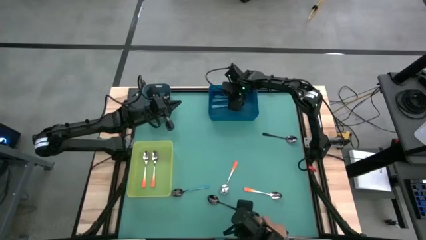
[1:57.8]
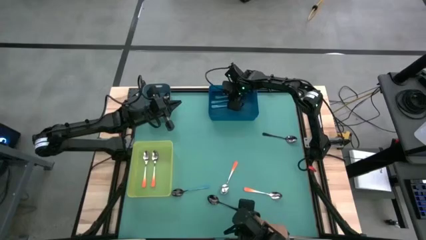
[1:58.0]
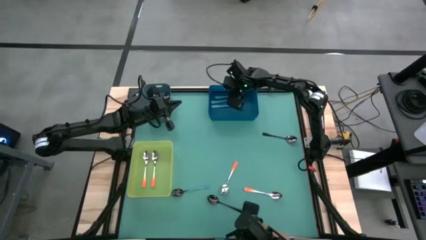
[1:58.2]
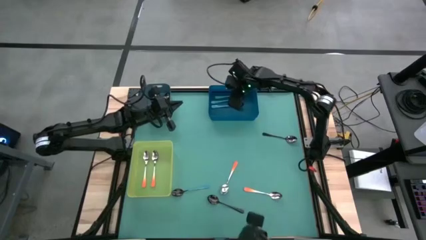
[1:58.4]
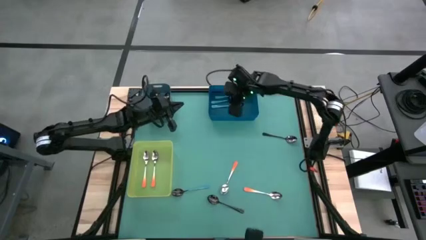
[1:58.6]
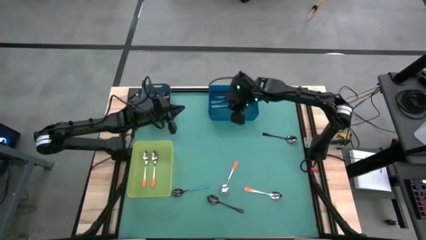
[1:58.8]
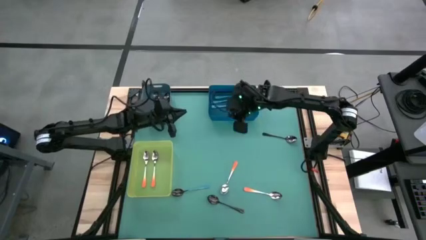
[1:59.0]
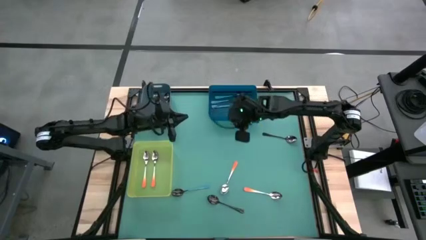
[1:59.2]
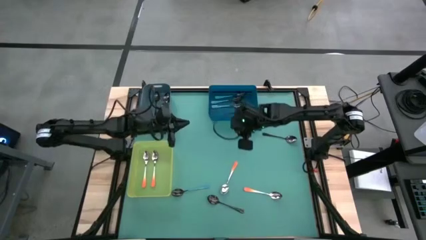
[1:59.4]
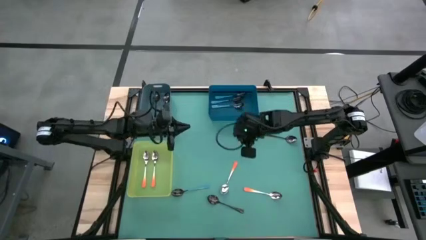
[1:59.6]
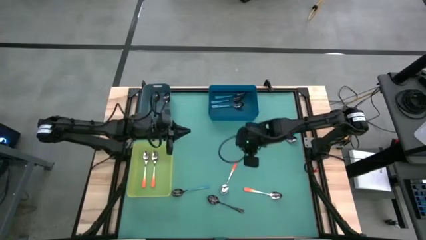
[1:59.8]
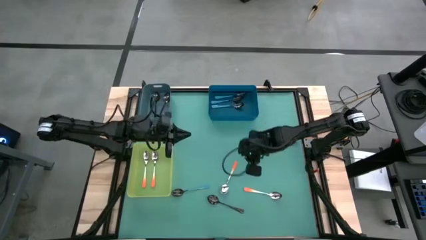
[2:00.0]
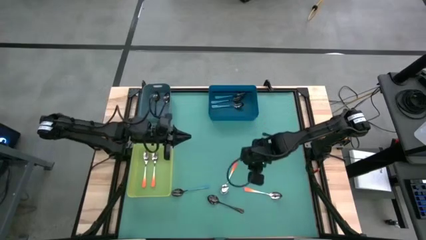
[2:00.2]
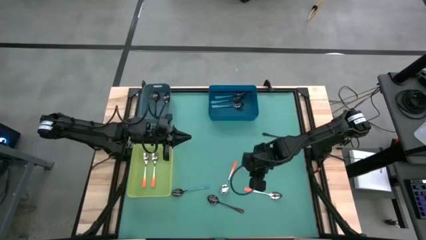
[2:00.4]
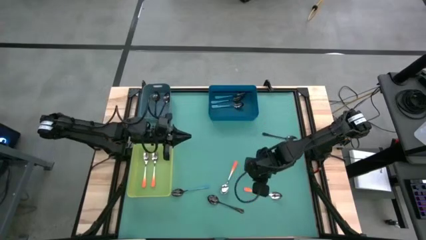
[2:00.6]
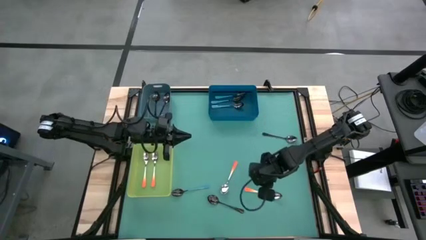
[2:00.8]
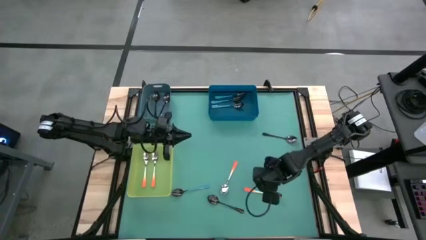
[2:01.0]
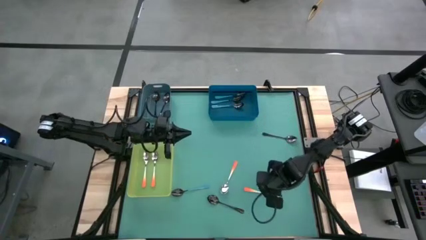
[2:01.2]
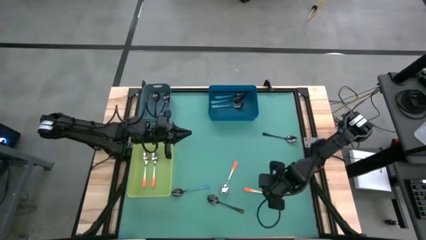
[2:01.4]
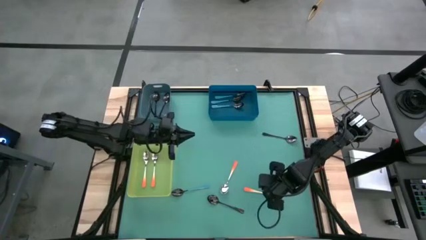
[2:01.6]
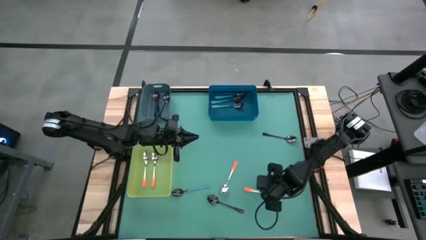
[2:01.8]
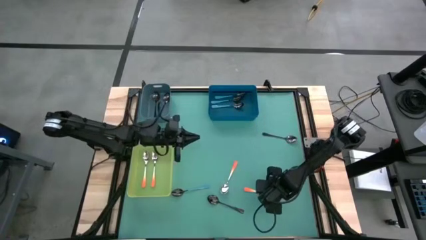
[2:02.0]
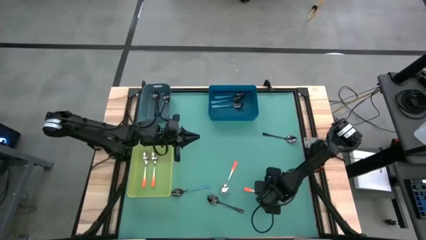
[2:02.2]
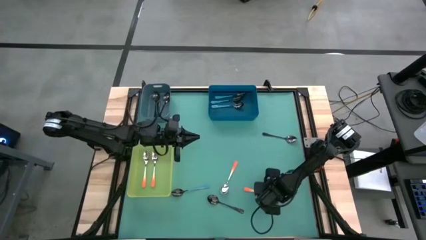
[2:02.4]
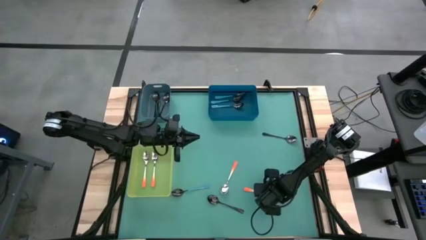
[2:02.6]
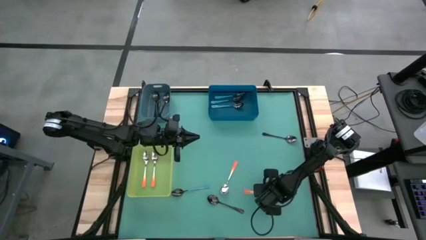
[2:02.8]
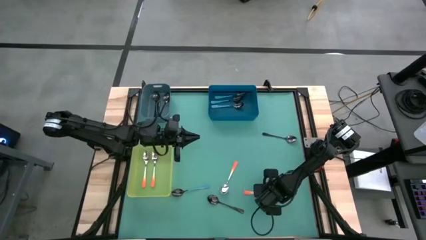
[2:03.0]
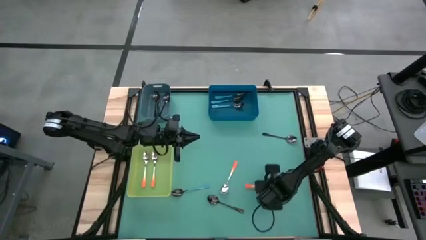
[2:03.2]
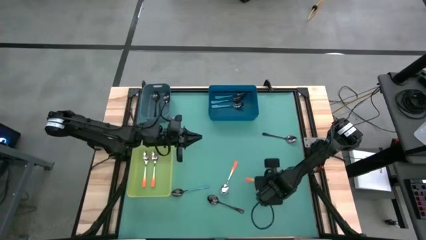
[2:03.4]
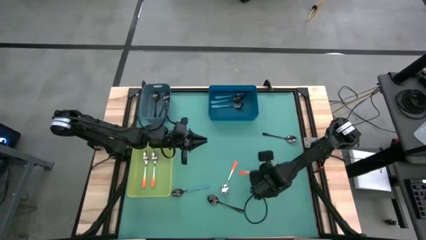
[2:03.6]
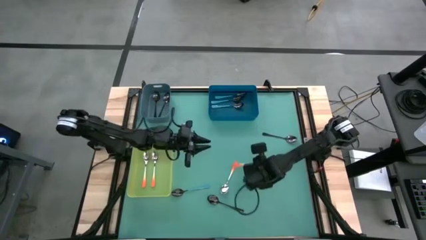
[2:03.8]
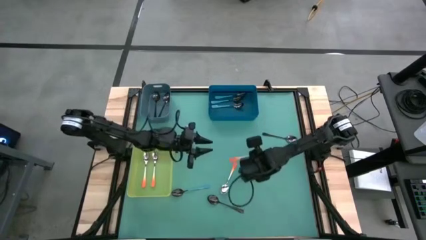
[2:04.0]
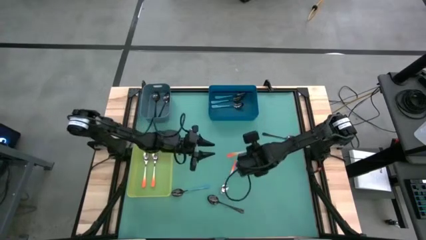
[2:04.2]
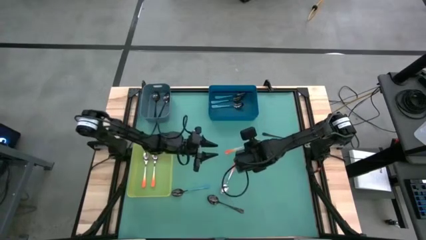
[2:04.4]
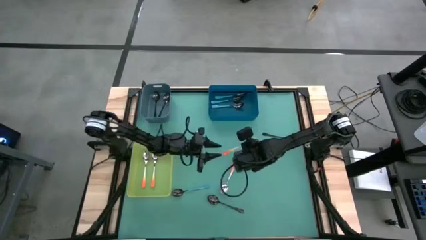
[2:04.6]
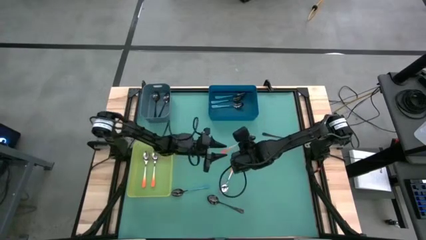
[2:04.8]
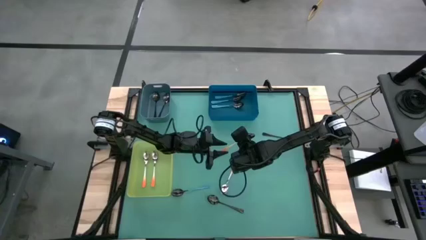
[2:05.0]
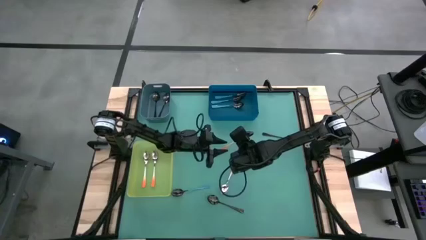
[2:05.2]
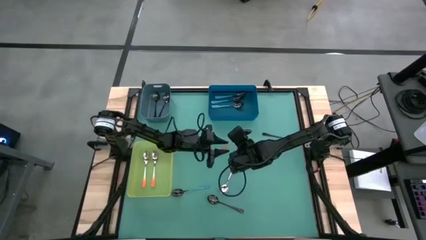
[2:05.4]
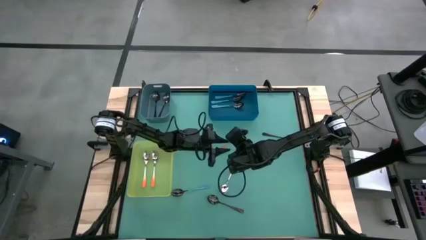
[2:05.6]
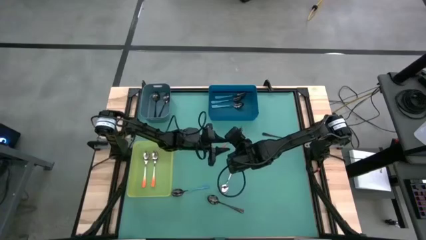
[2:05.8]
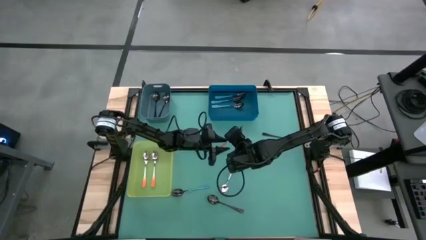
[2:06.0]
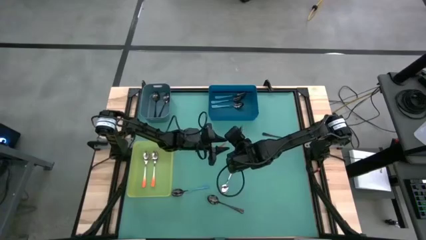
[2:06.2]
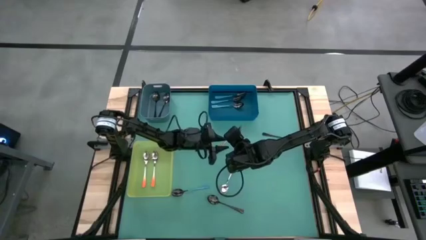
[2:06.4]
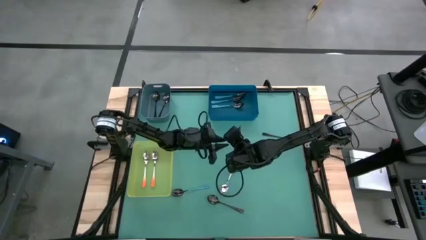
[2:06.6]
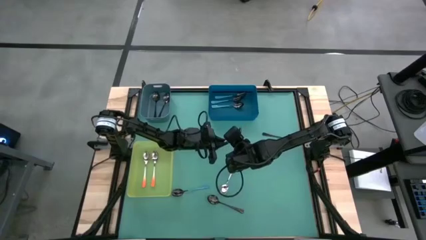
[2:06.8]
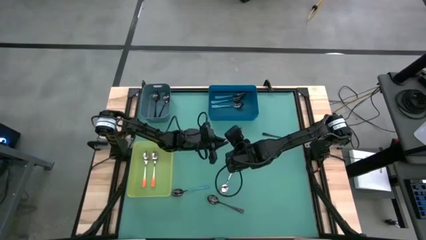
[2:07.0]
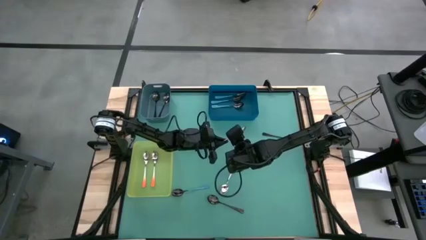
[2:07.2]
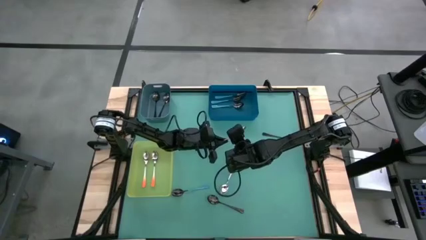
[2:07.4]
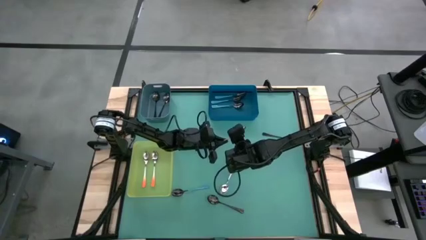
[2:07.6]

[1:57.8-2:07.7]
Task: Sort silverware by color (type)
Put the orange spoon into the yellow bin
